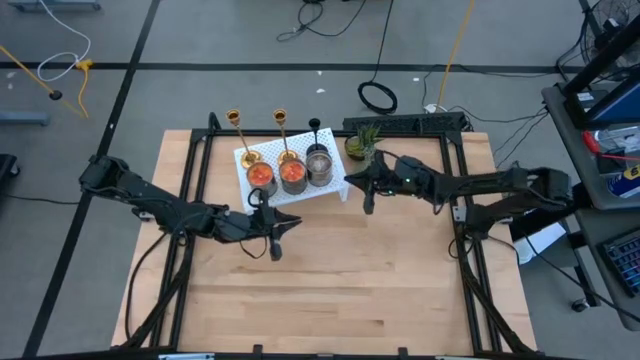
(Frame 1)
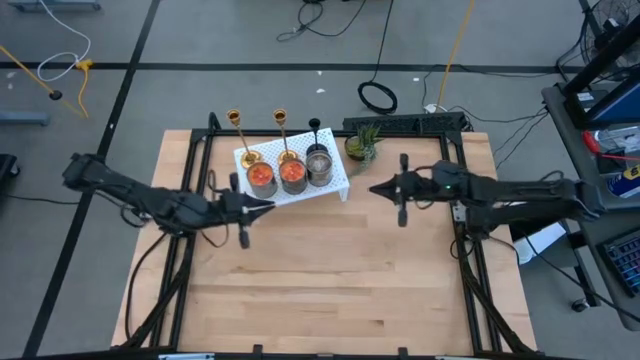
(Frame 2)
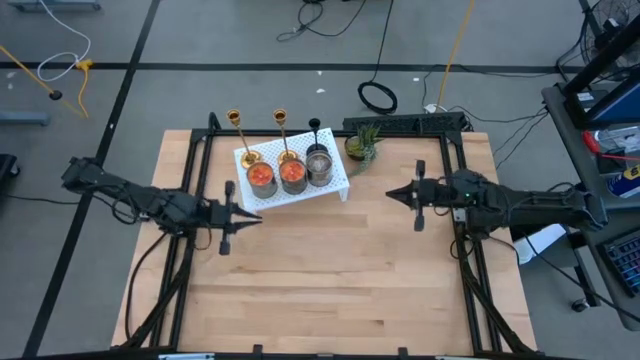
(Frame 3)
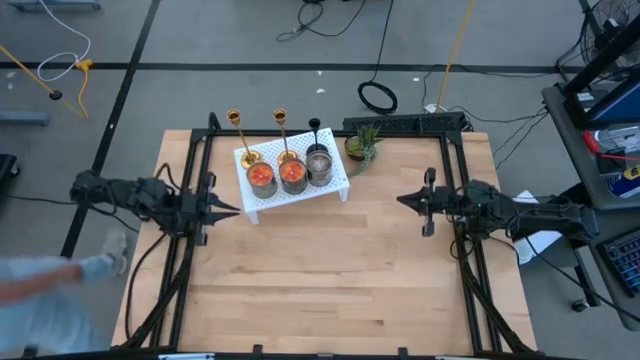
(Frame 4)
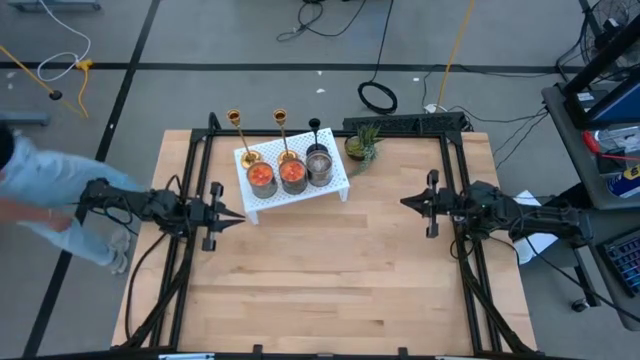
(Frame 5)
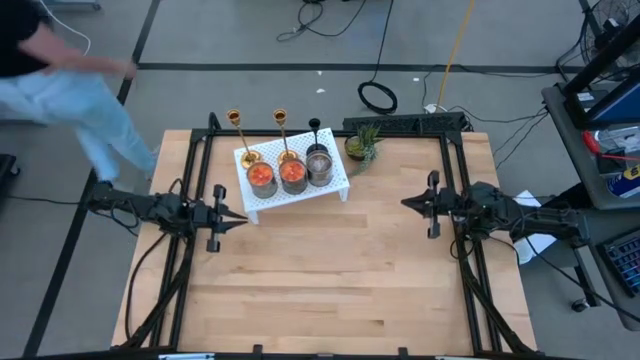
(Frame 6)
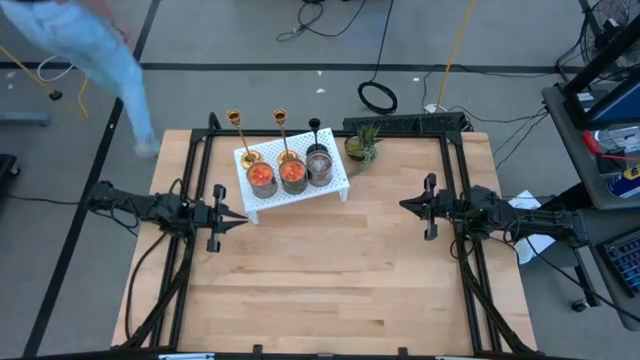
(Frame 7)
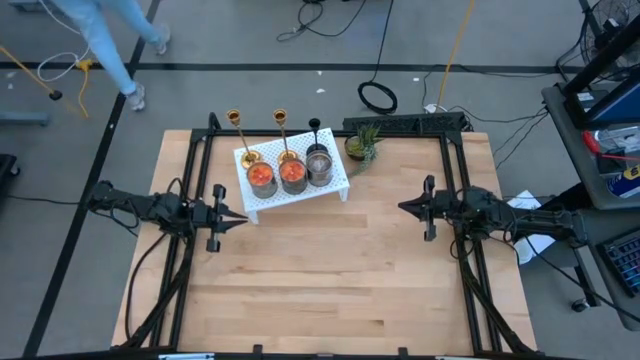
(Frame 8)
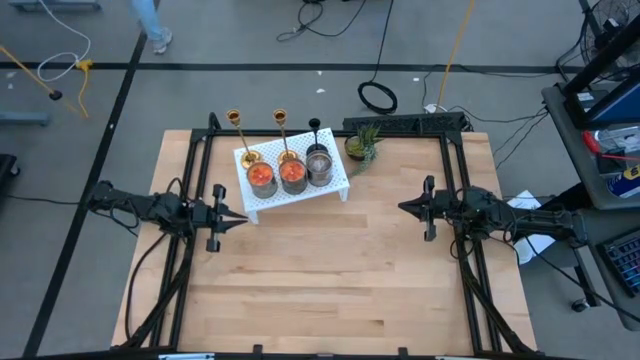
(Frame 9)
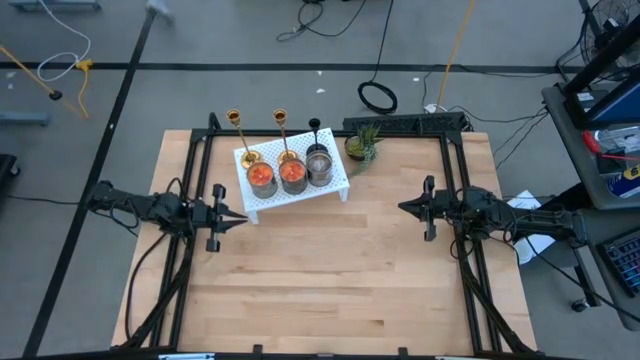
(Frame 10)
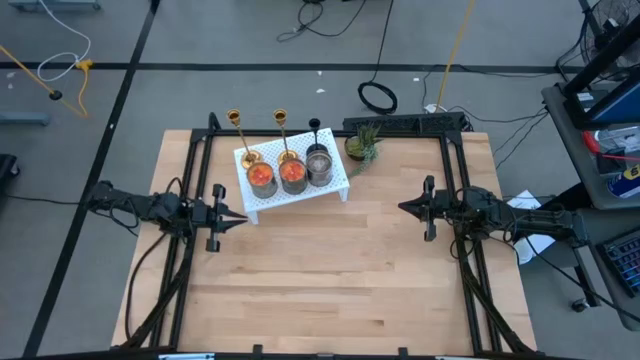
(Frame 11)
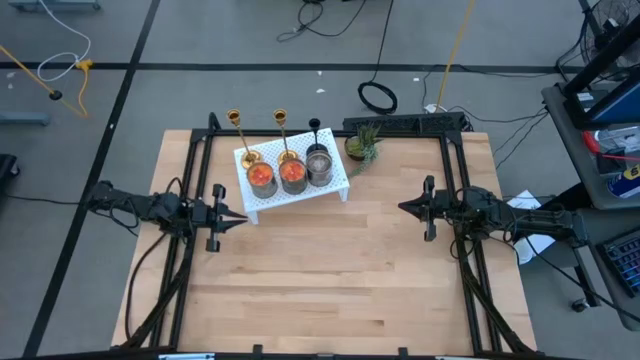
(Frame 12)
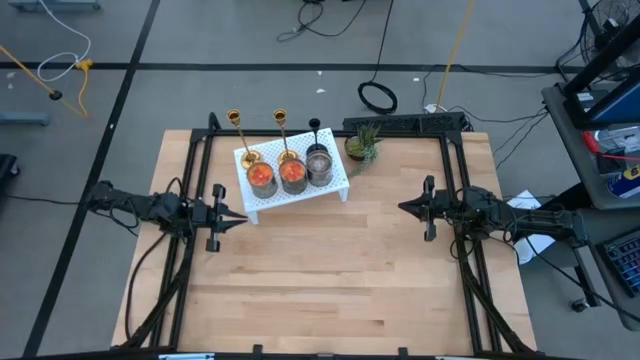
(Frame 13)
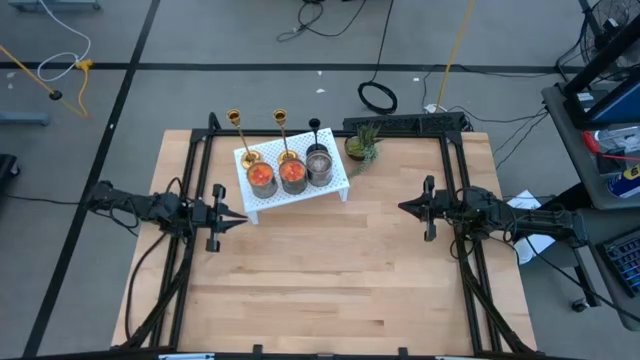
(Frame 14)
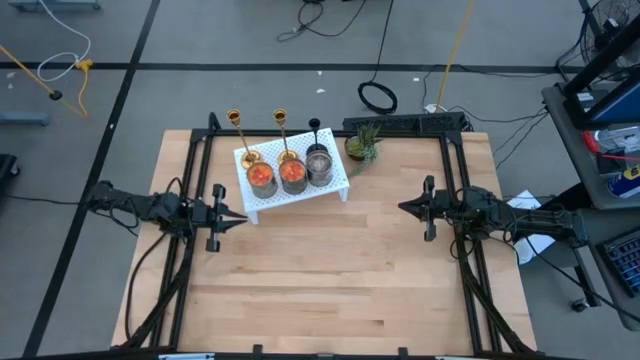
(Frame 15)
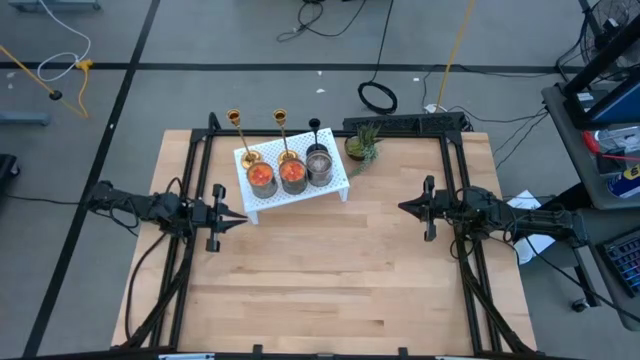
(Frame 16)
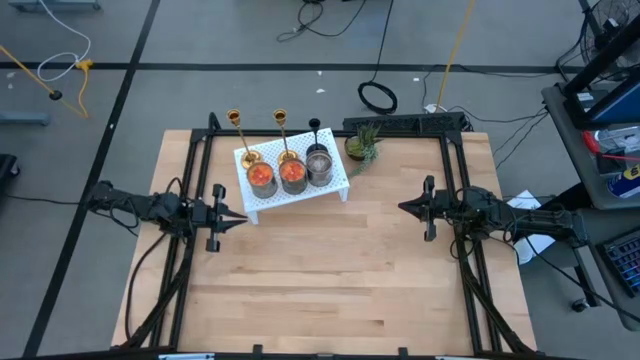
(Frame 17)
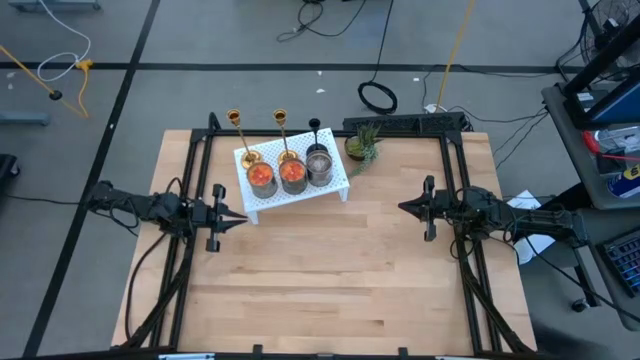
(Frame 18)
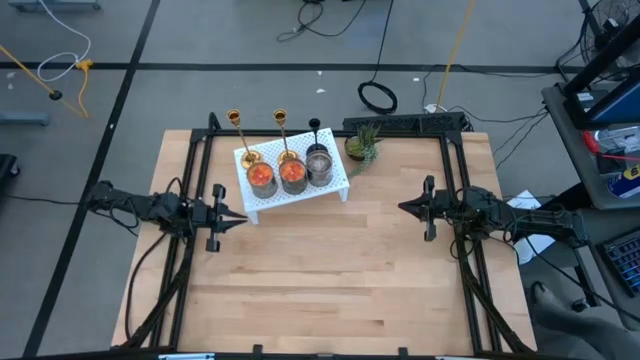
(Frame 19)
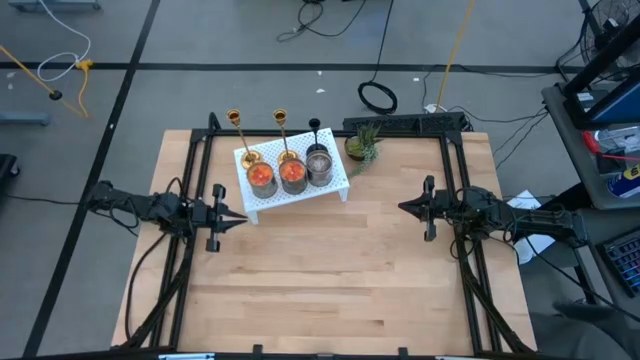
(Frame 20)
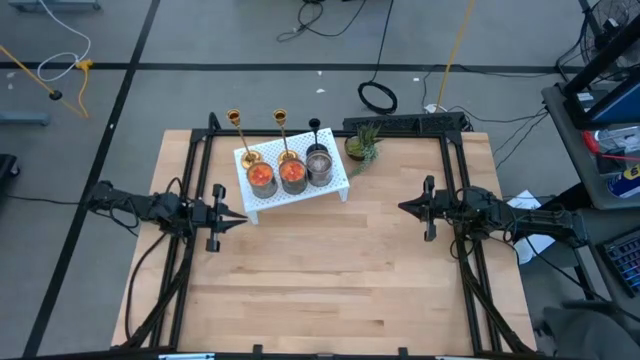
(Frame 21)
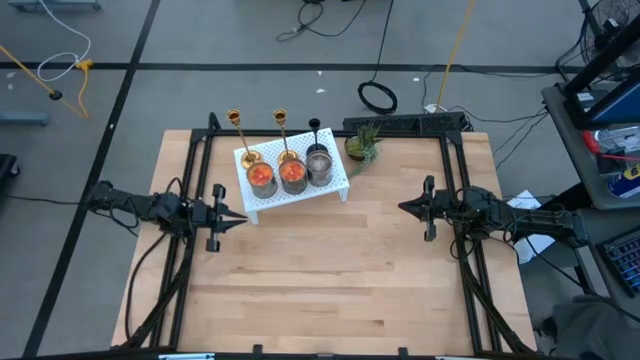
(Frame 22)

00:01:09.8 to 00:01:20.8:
Task: Pick & Place candle stick holders
Return to Home Position

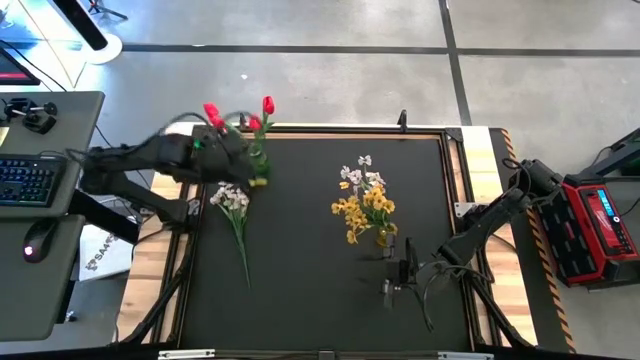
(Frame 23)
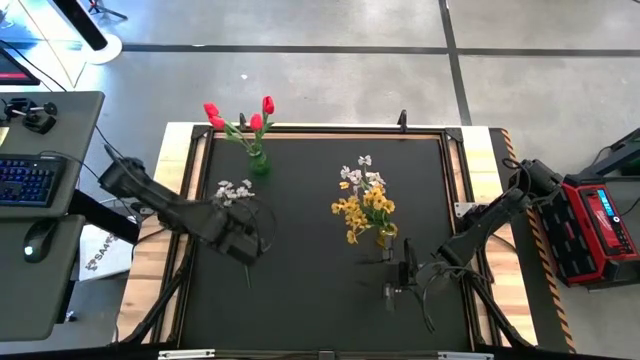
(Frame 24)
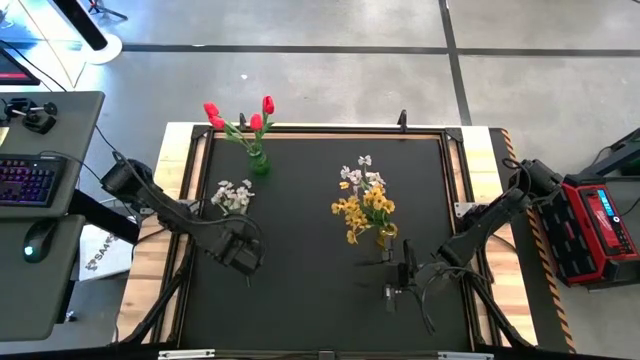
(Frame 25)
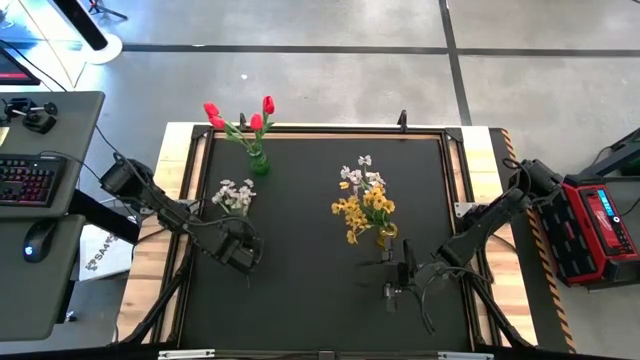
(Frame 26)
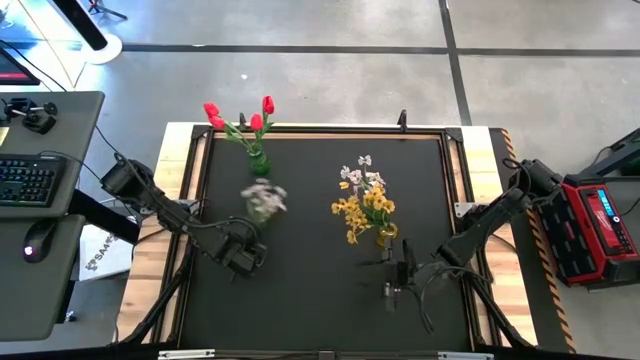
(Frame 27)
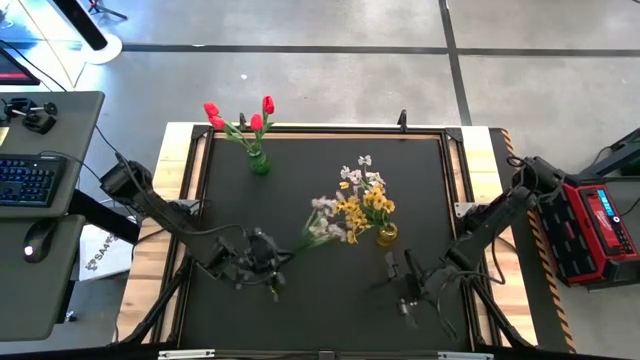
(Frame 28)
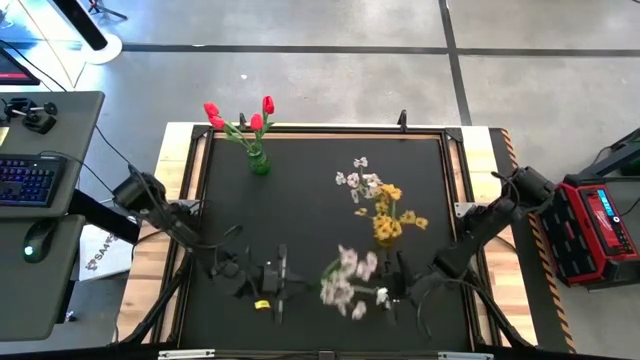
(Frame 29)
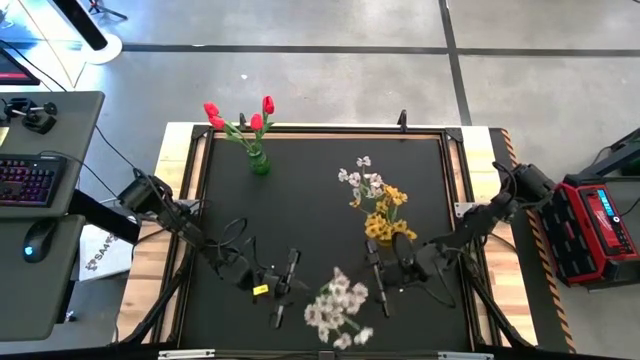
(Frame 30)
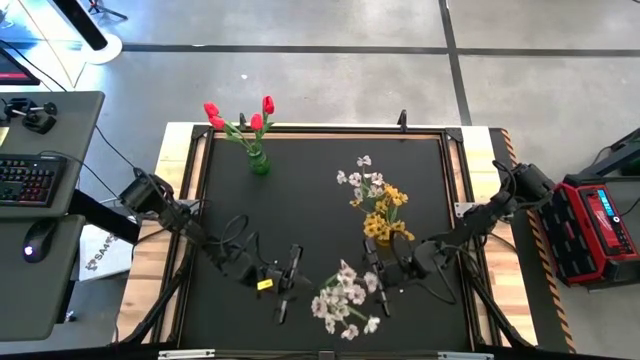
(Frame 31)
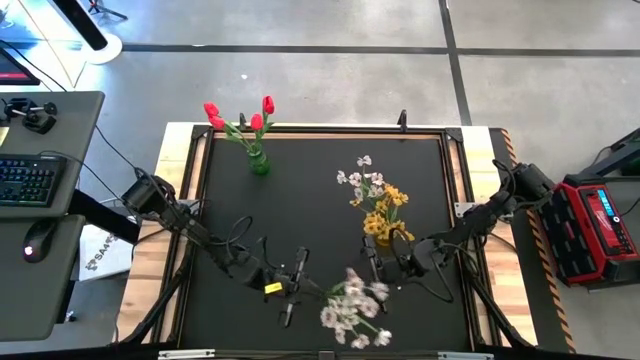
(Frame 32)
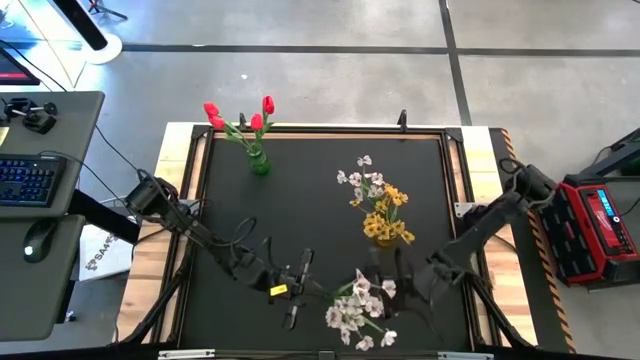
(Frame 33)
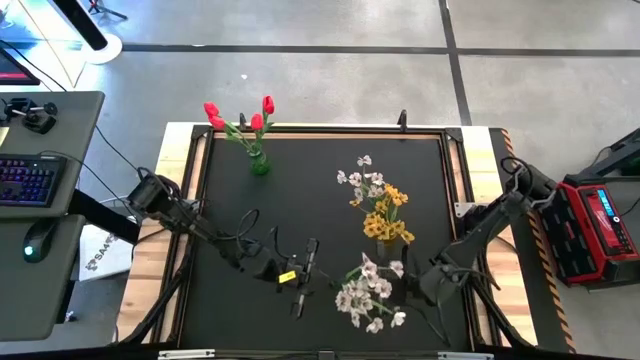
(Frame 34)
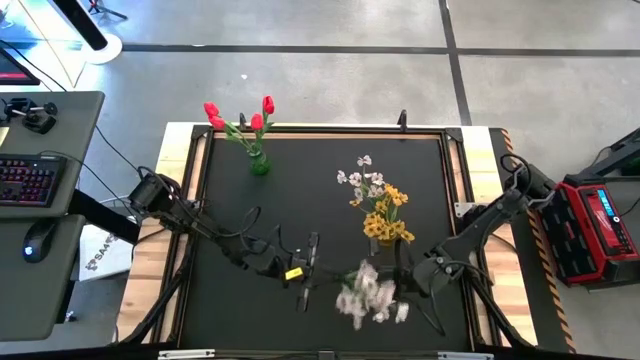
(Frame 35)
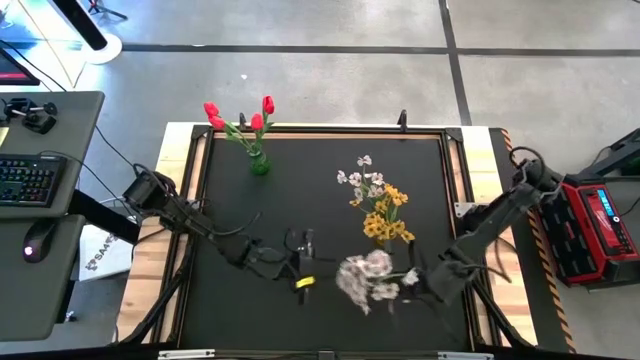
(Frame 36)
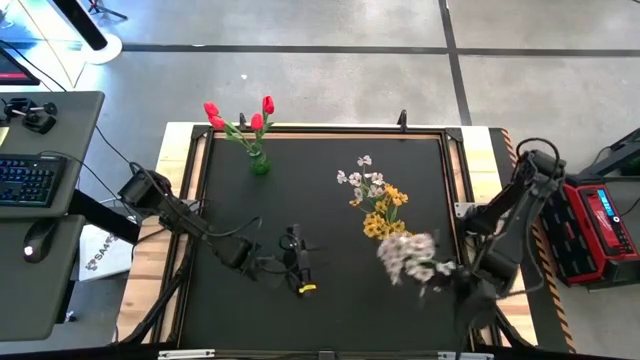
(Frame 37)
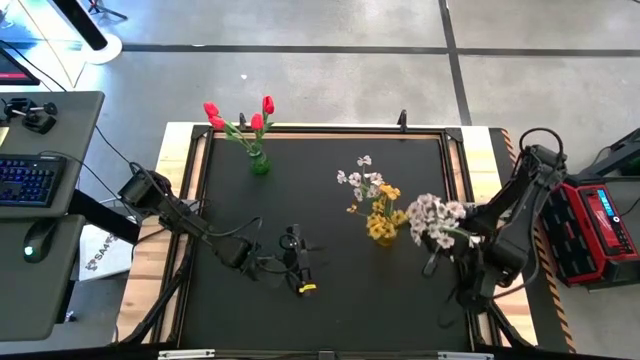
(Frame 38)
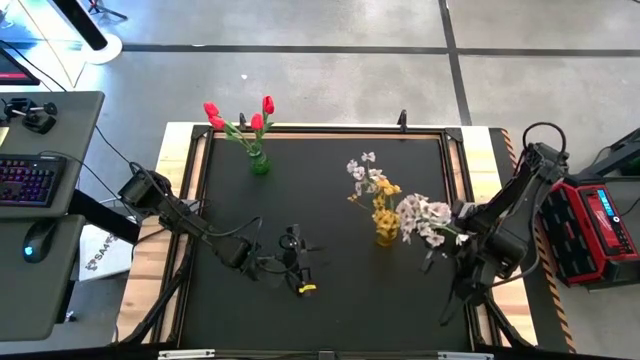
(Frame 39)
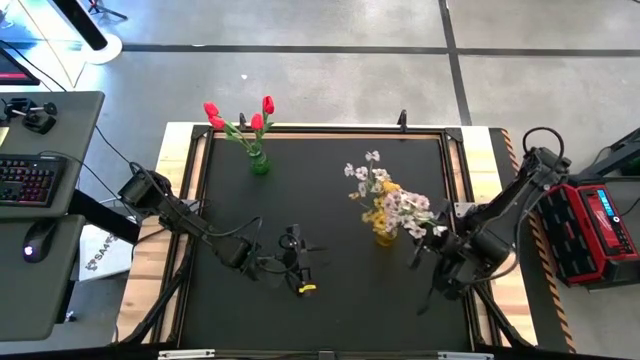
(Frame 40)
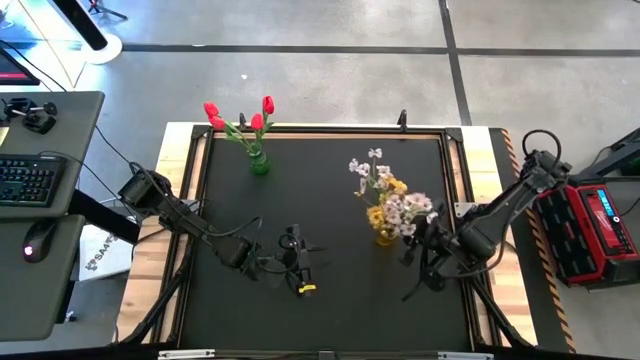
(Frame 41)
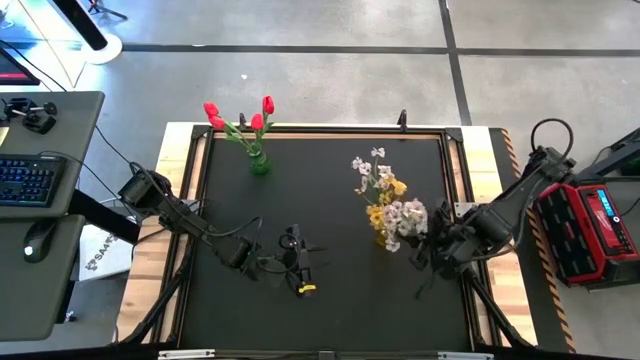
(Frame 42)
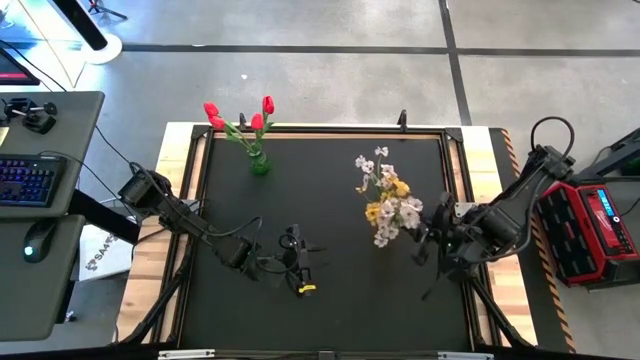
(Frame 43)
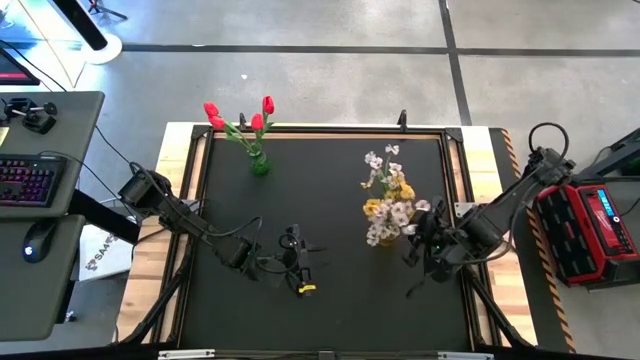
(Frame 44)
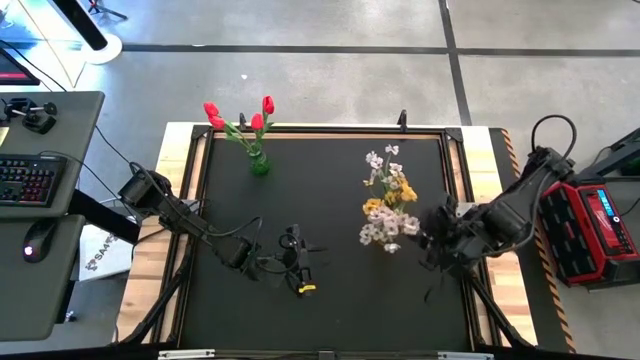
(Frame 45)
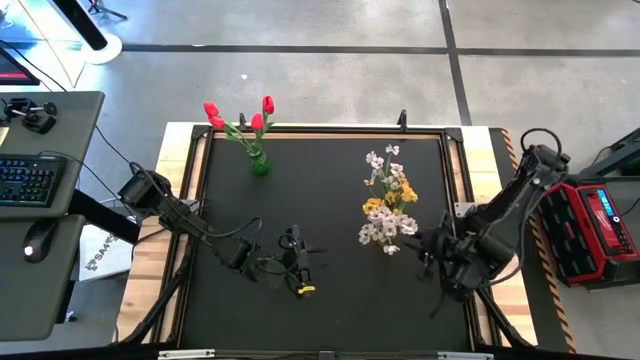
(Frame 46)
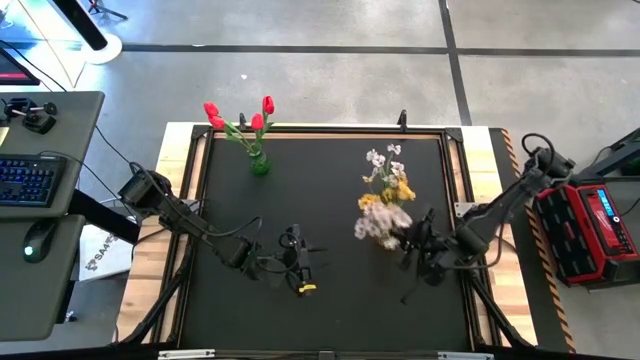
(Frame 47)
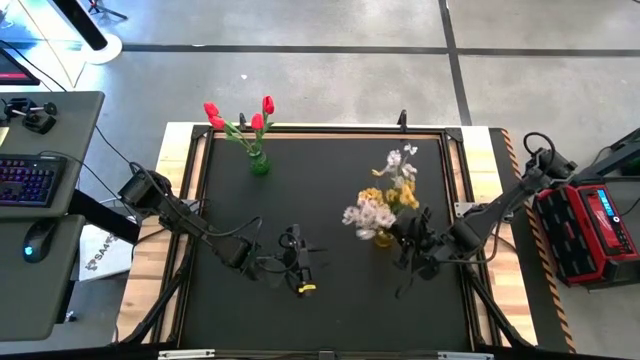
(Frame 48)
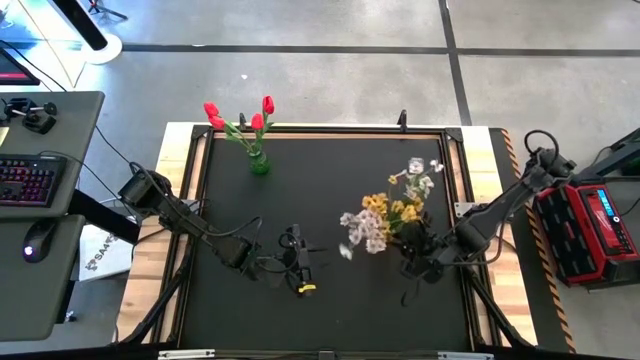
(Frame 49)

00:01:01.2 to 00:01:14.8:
Task: Sort flowers into vase by color
Put the white flowers in the yellow vase
